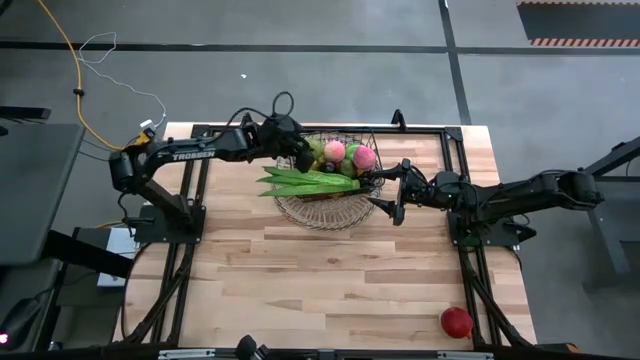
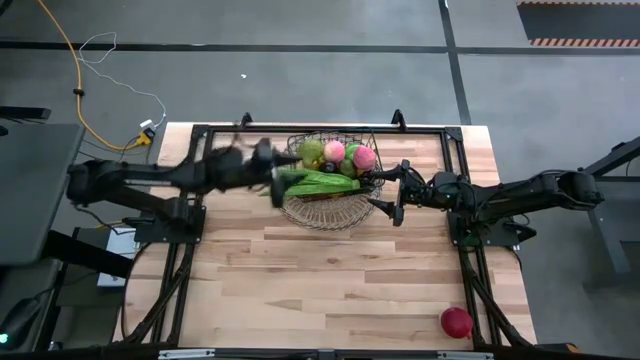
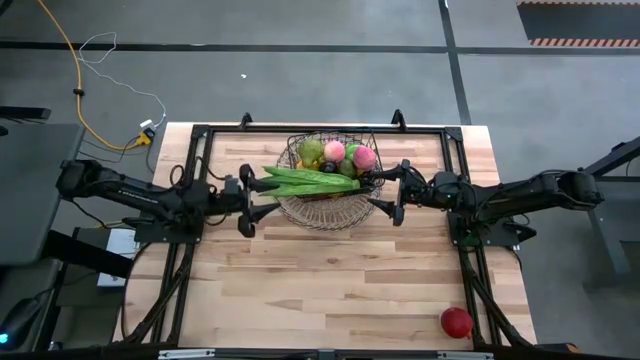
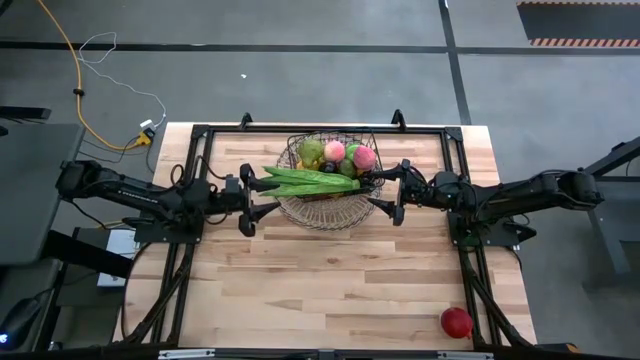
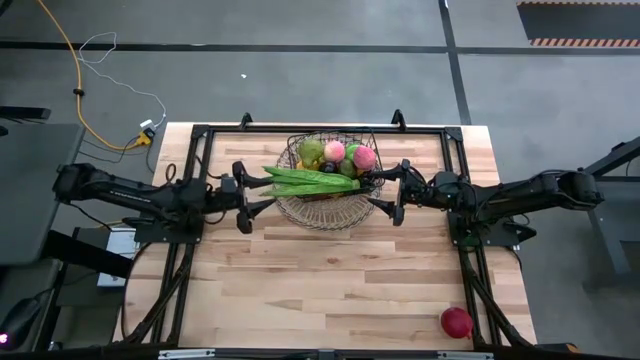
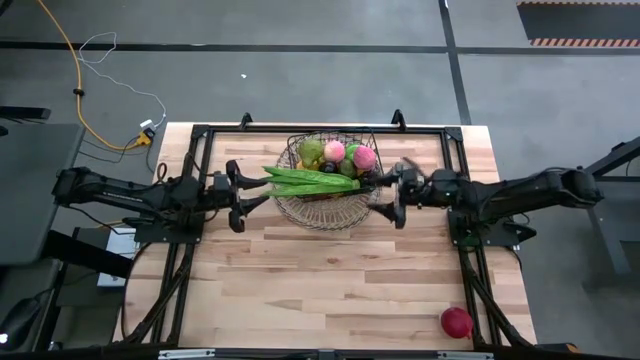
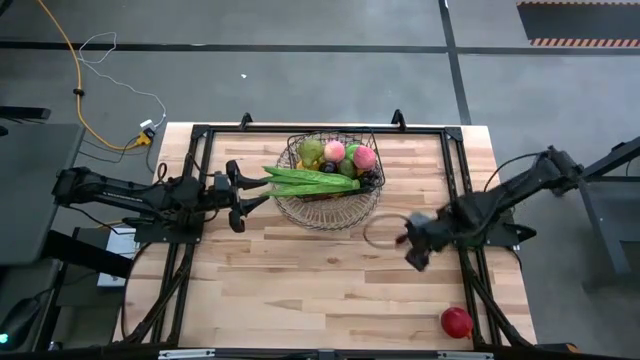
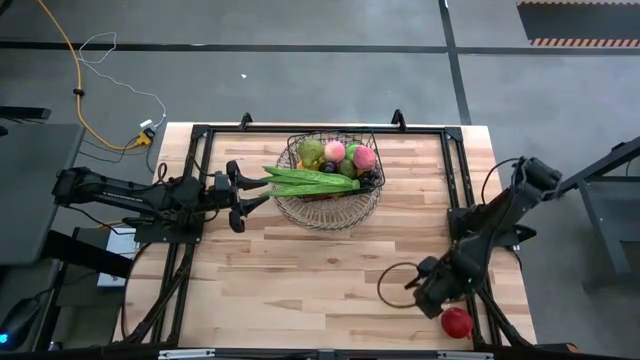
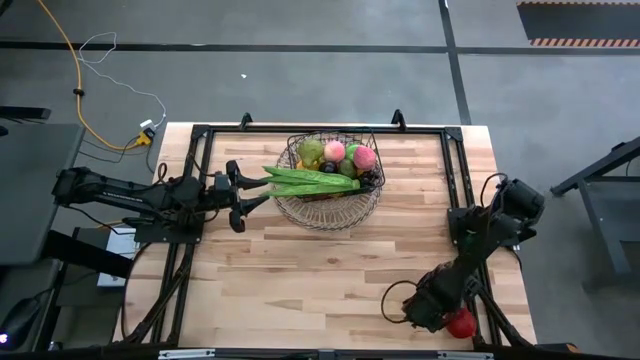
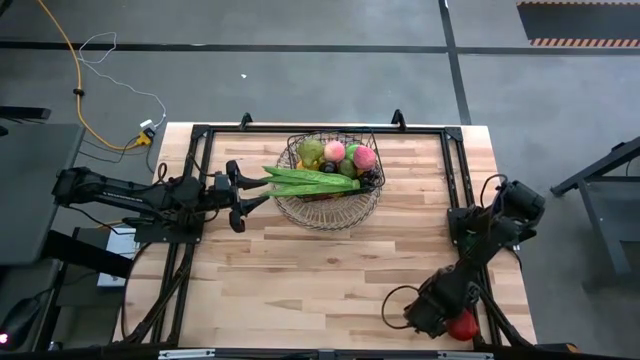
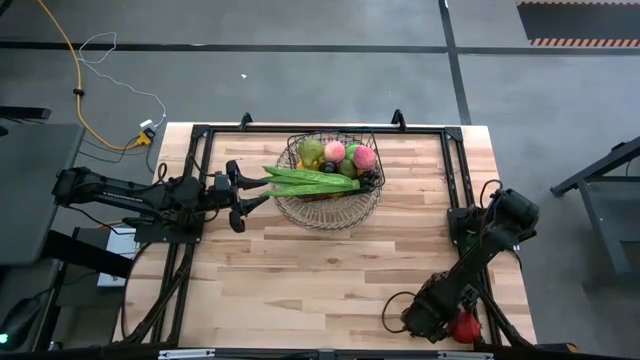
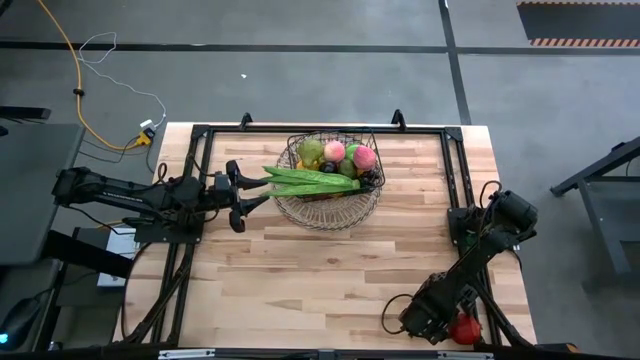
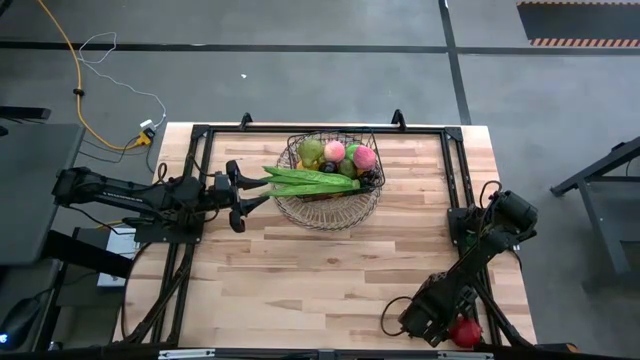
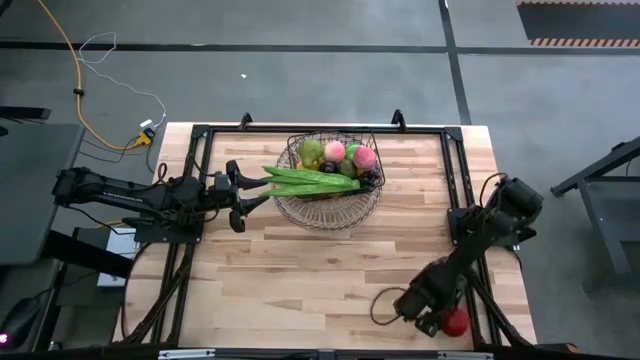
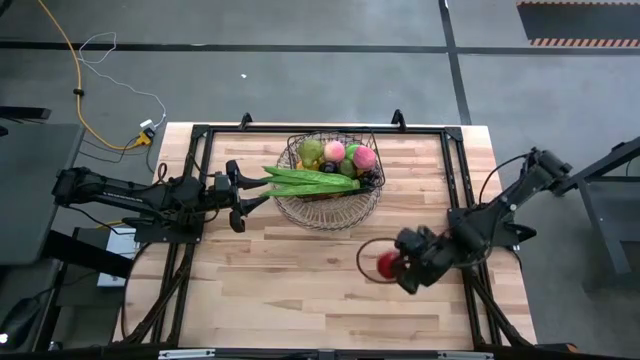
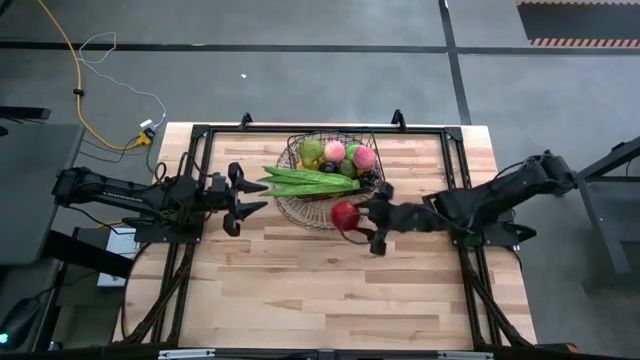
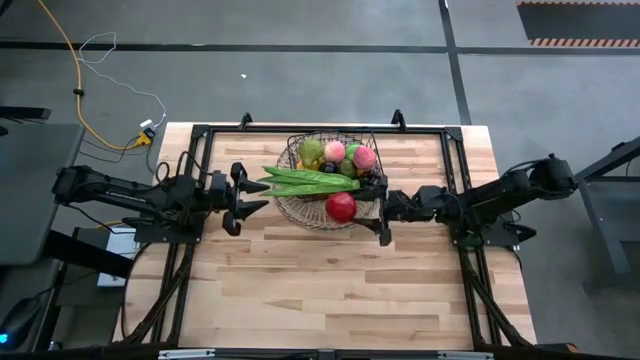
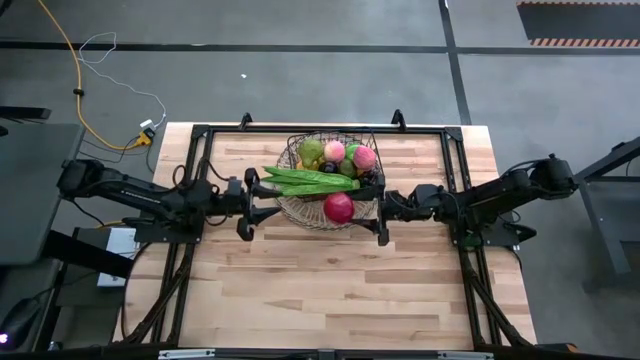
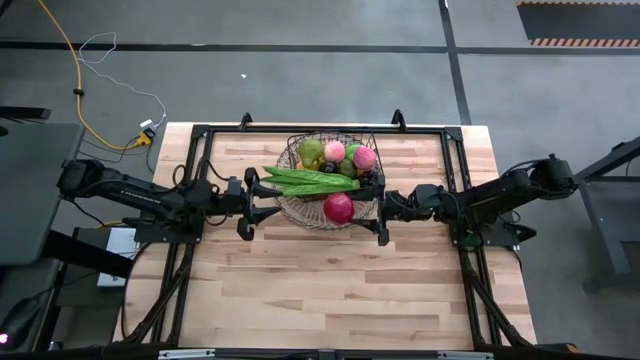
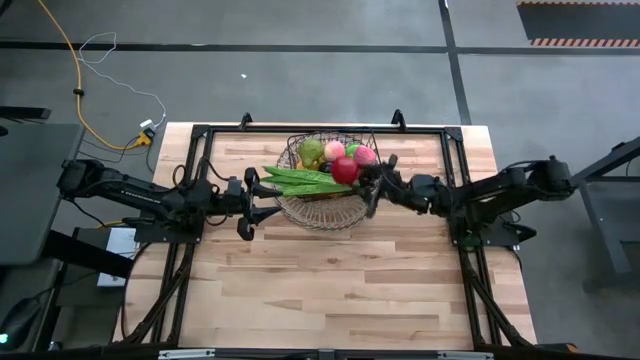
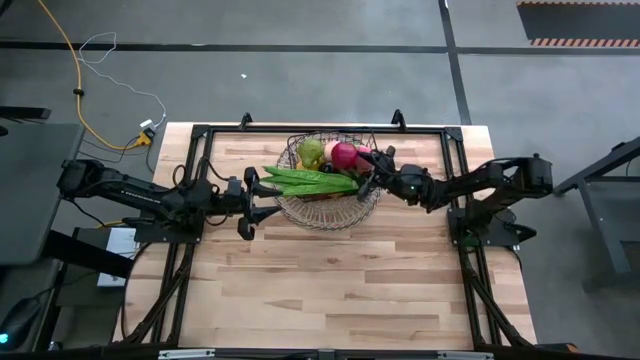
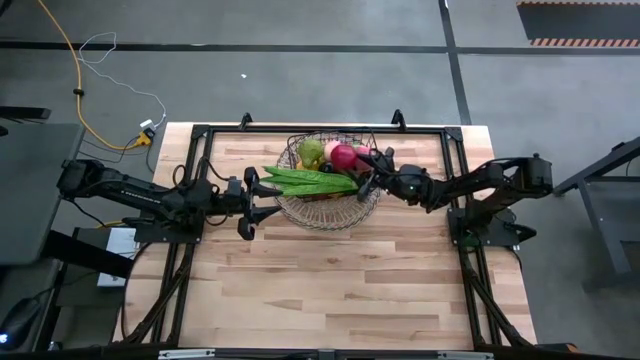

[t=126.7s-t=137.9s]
Task: Build produce basket
Put the red pomegranate into the wire basket

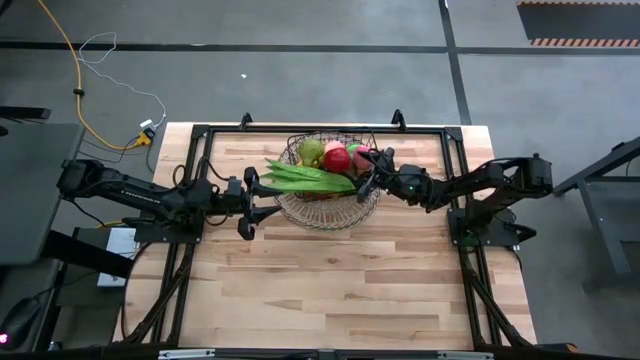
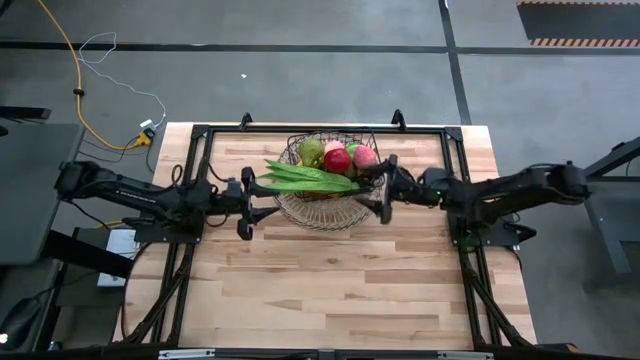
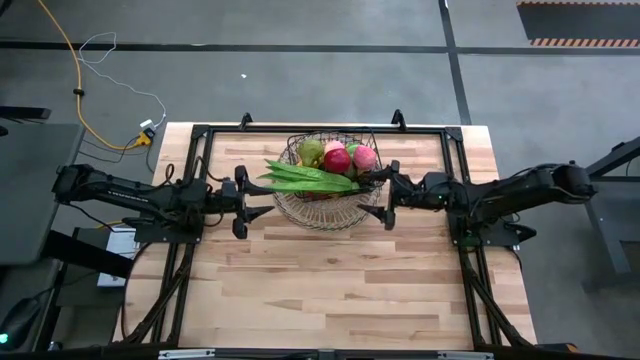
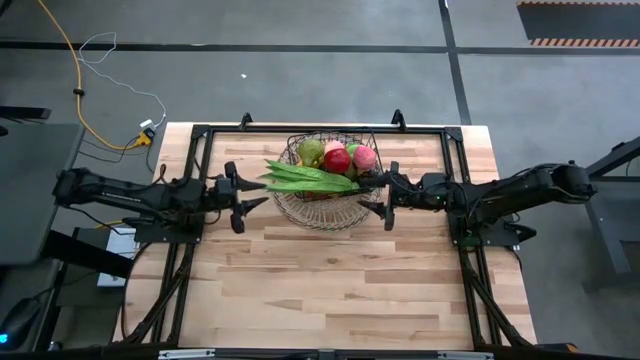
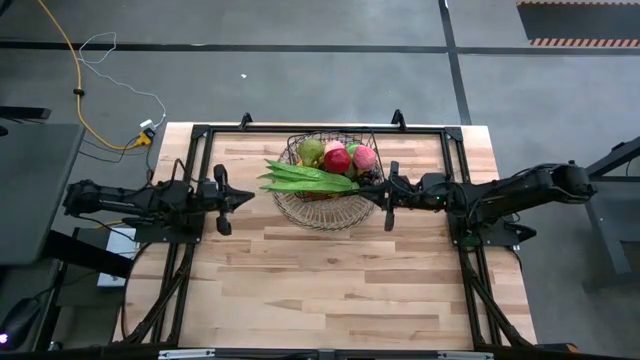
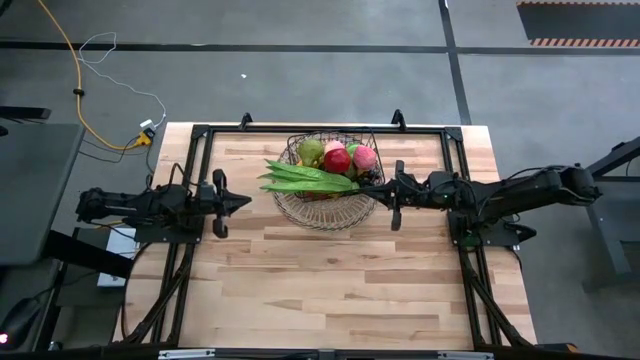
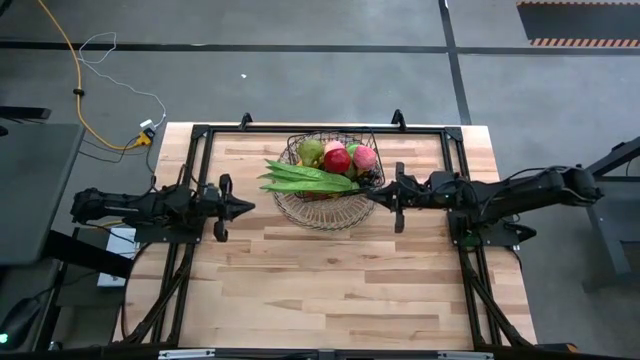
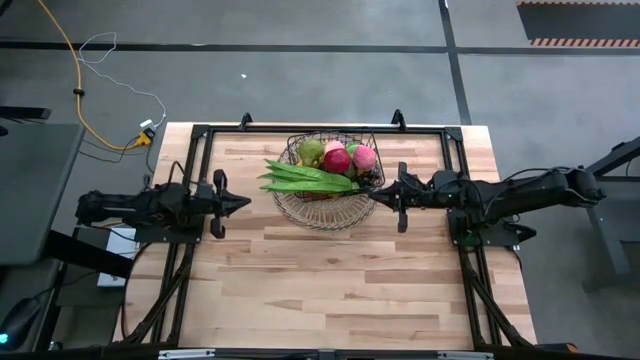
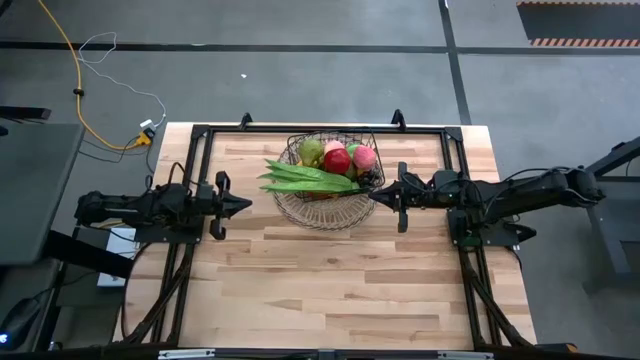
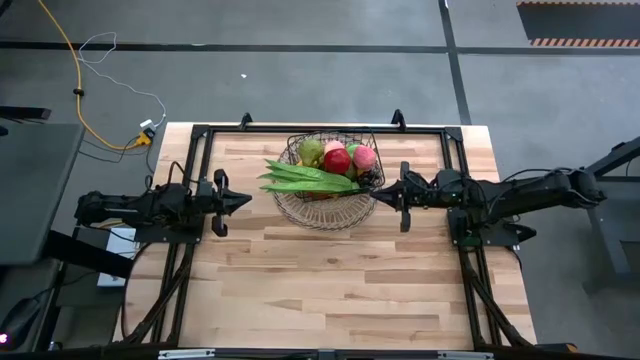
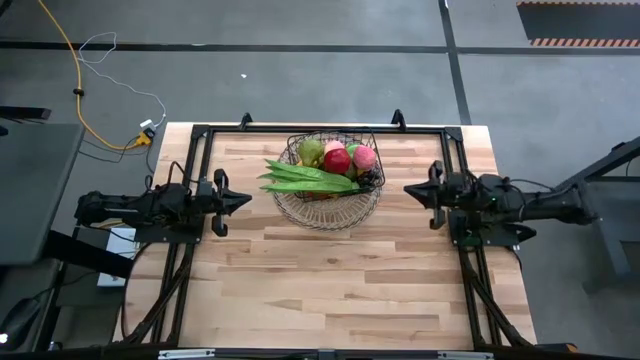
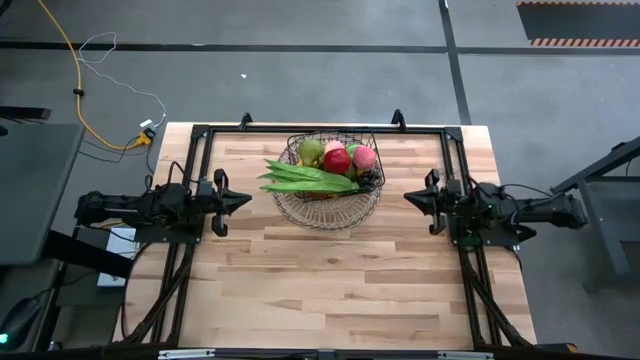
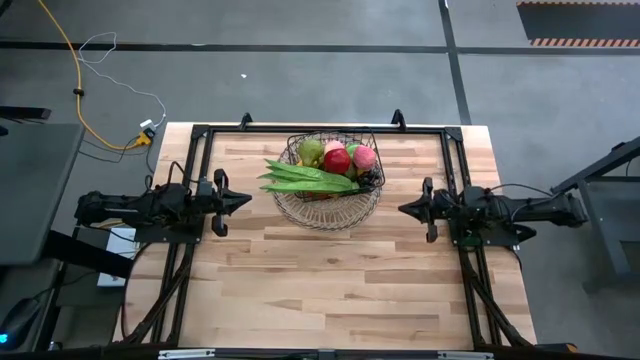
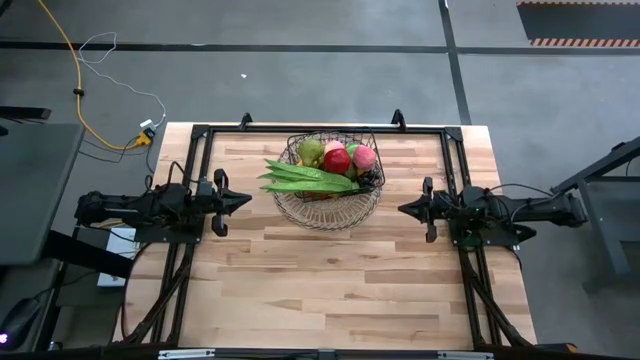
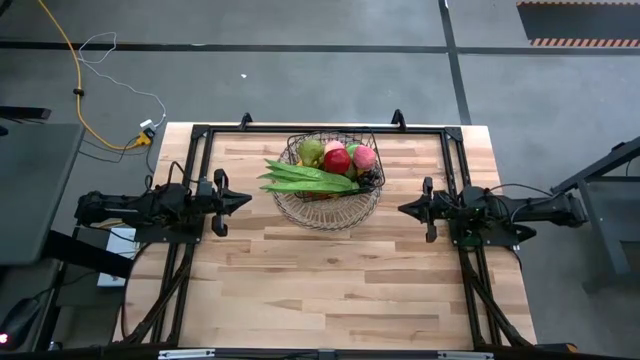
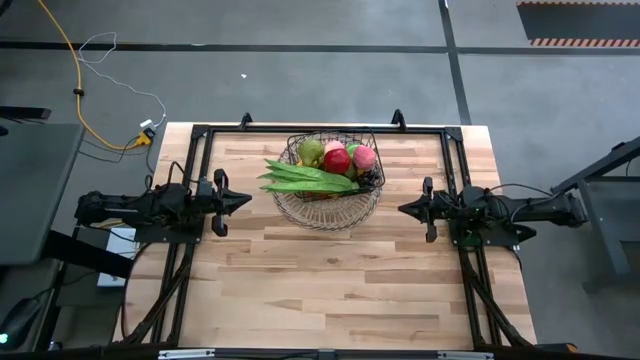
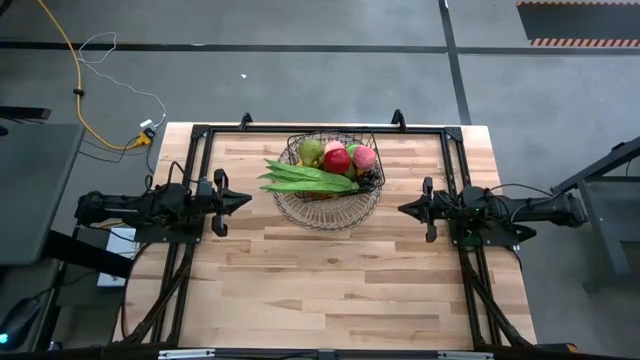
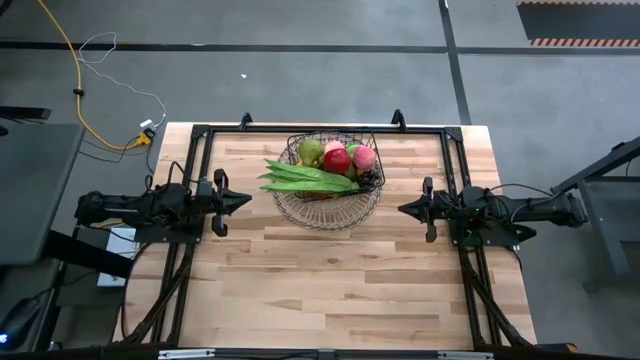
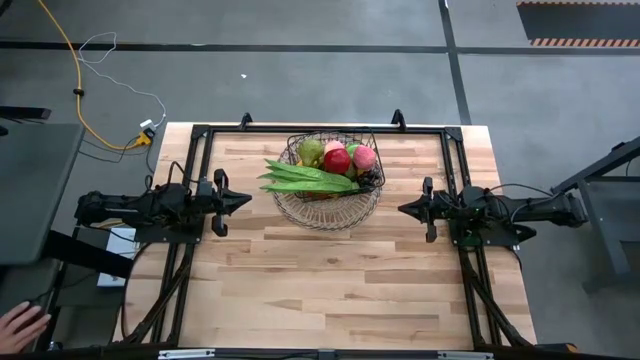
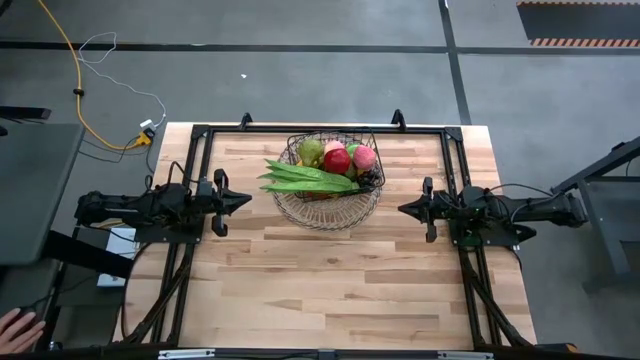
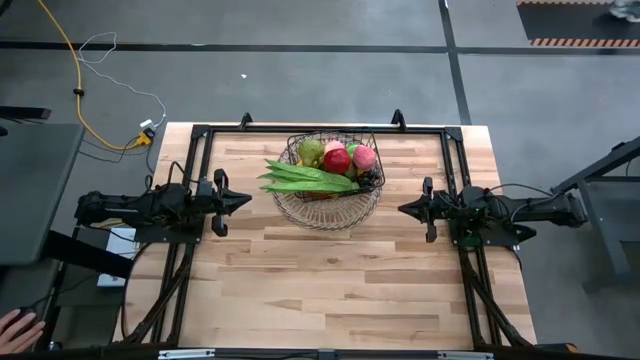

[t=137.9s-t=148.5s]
Return to Home Position
